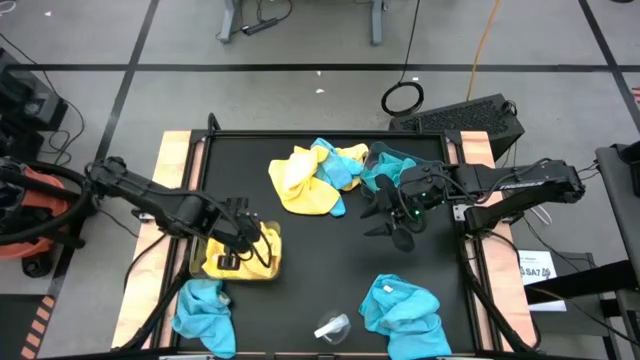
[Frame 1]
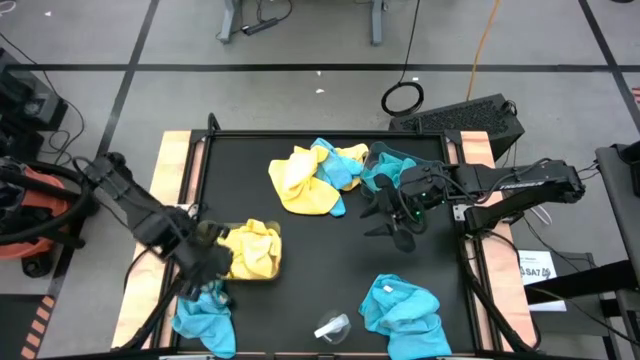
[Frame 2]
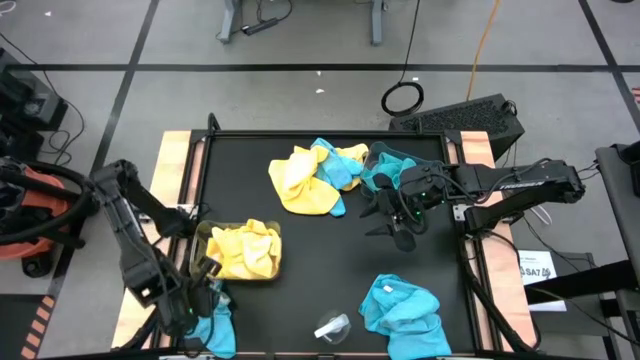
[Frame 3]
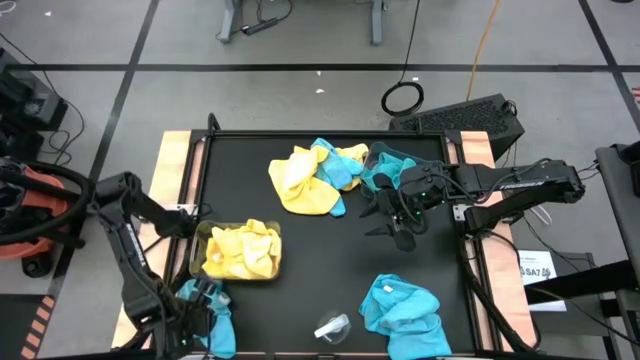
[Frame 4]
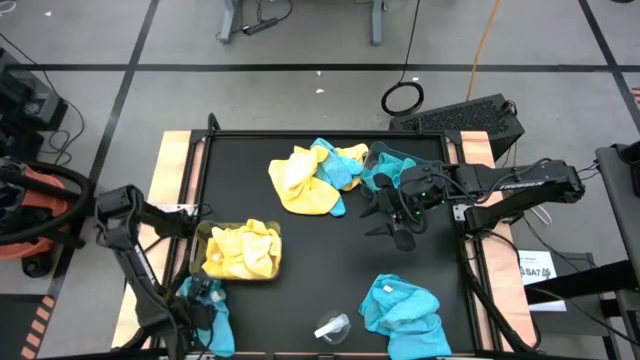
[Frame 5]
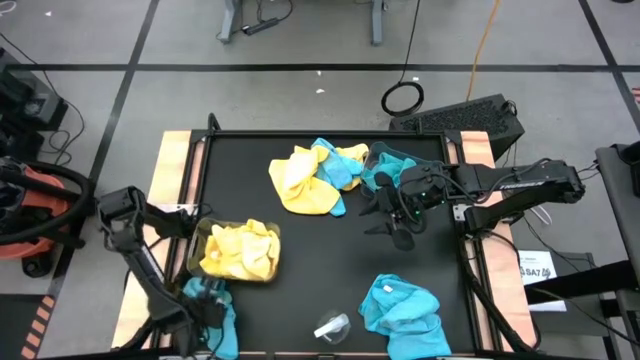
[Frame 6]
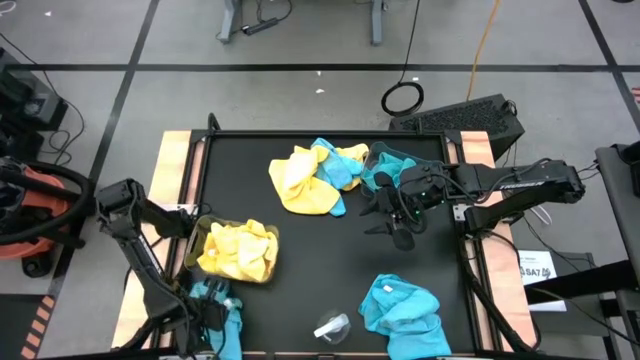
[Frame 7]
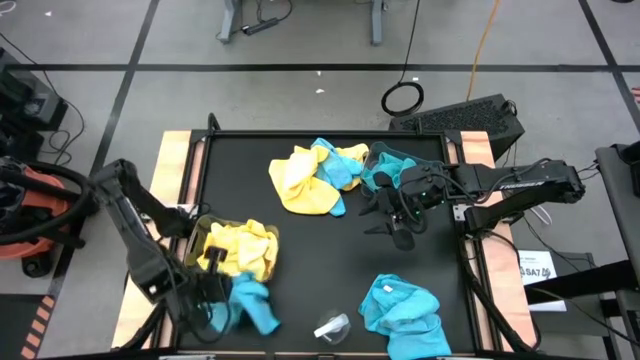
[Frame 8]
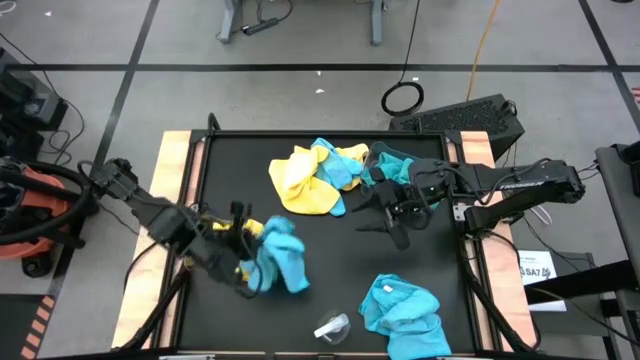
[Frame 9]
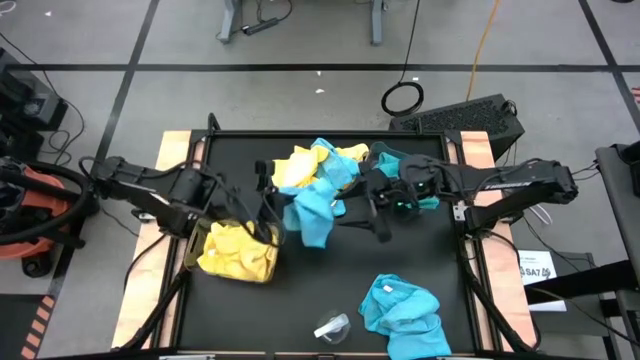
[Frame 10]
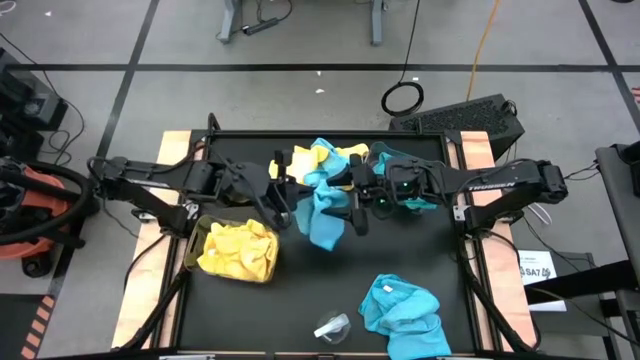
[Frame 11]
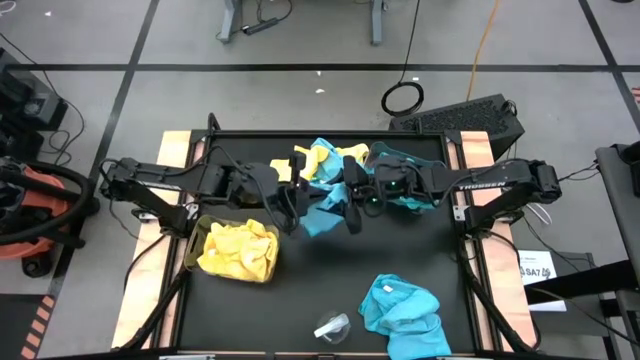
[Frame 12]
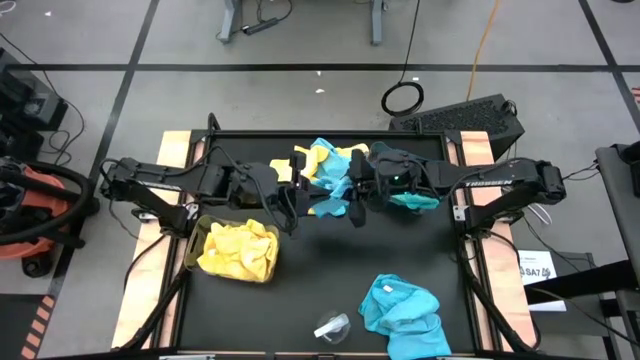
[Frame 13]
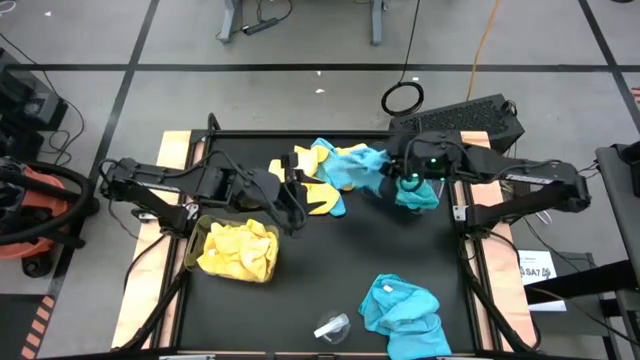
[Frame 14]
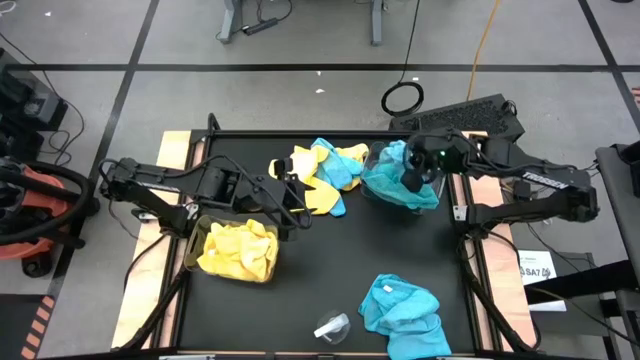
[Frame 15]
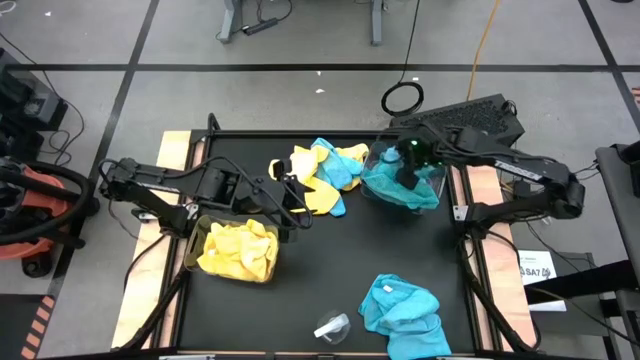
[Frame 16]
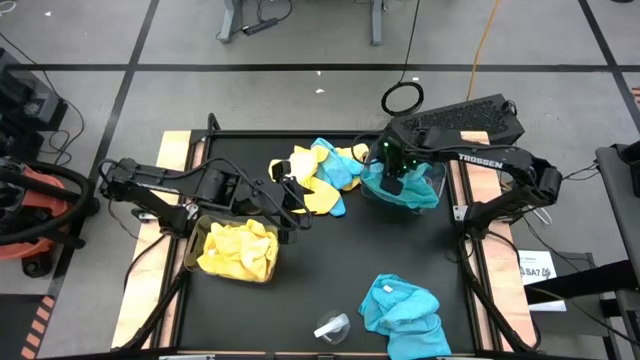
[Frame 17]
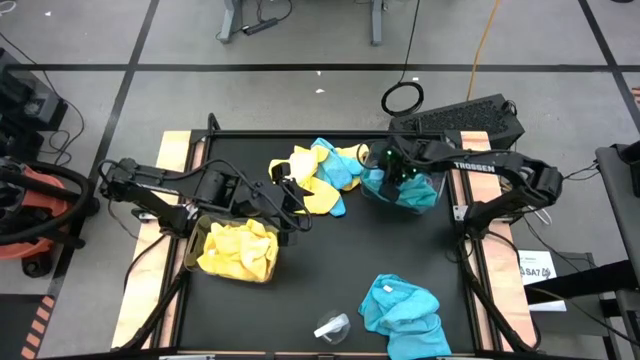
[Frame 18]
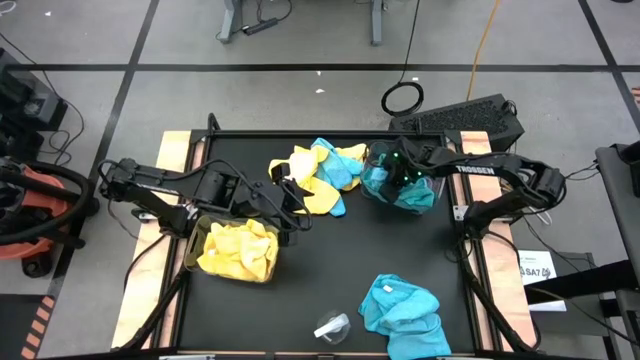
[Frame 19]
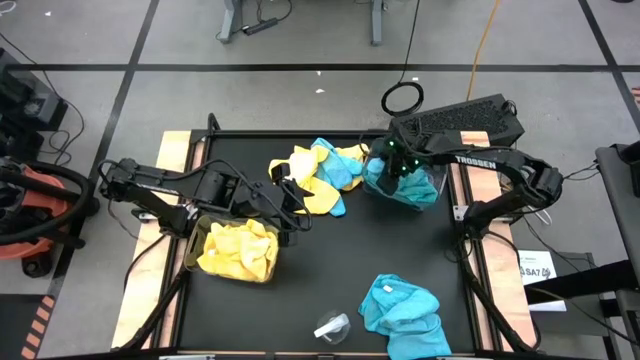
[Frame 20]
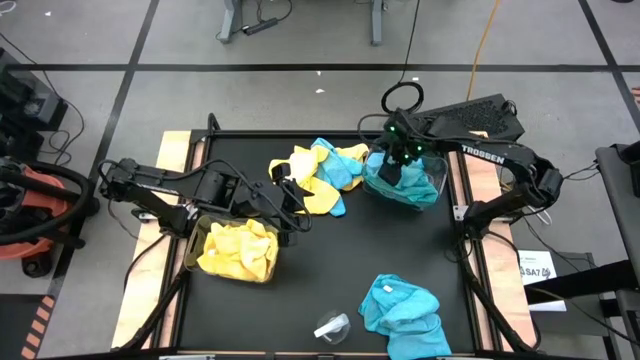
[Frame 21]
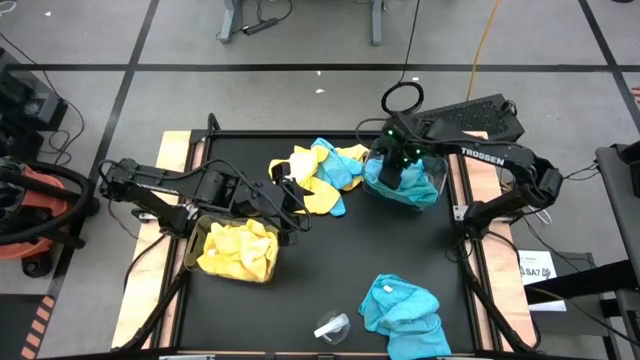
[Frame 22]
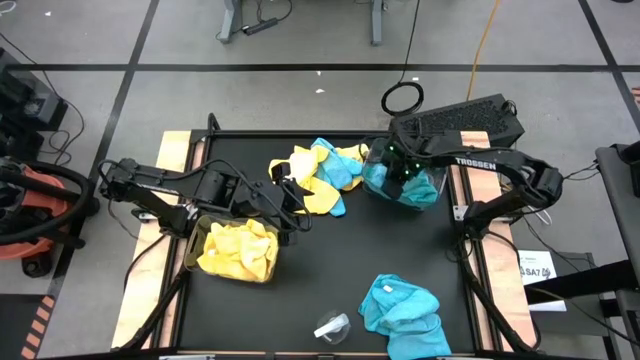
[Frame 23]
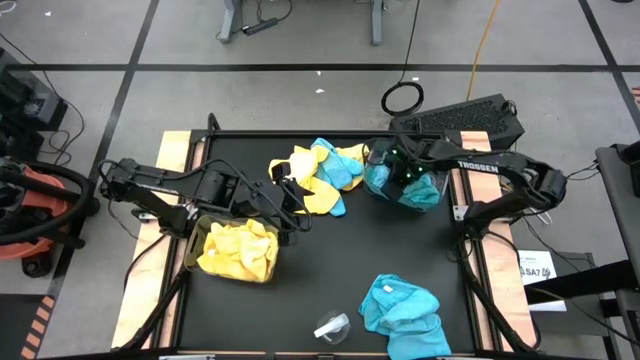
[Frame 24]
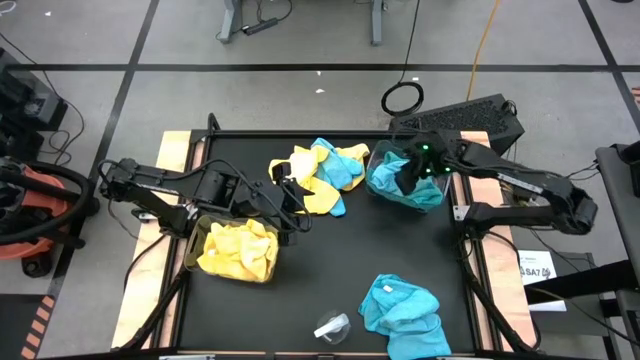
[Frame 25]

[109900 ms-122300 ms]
Task: Sort microfiber towel by color & place in baskets
Put the blue microfiber towel into the top transparent bin

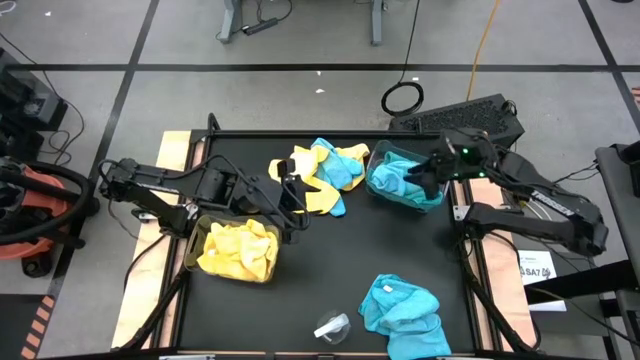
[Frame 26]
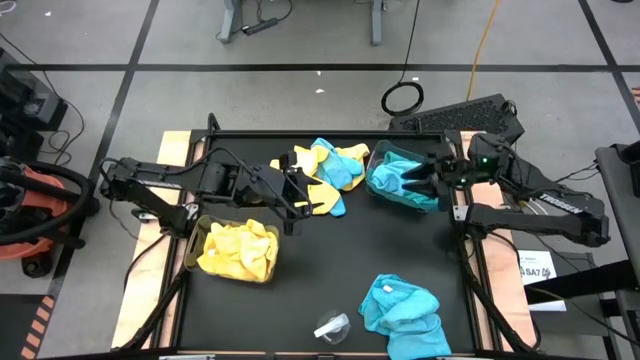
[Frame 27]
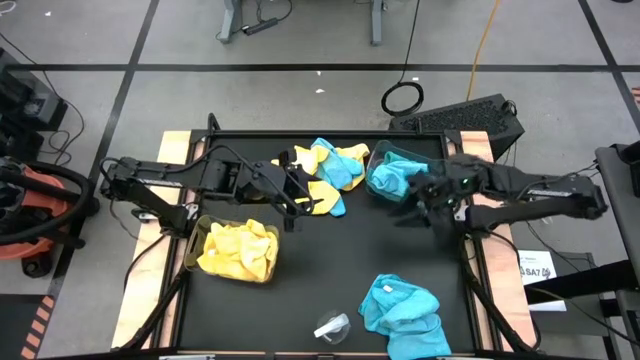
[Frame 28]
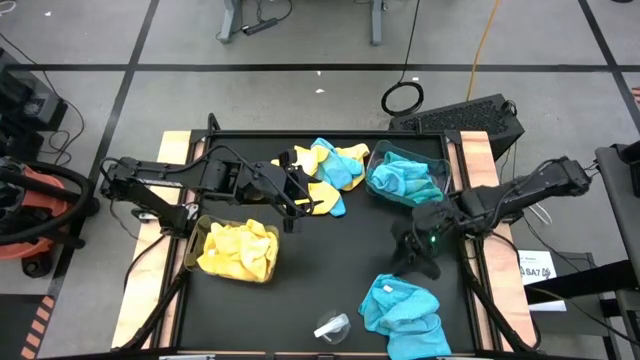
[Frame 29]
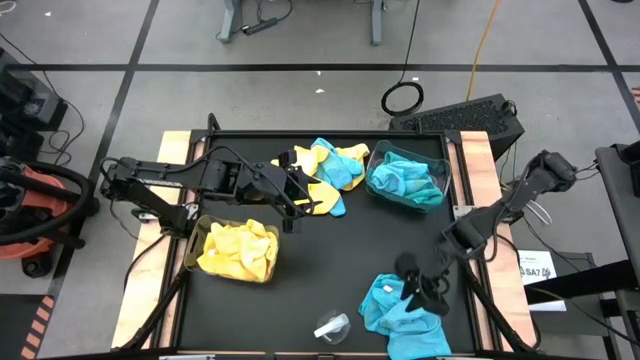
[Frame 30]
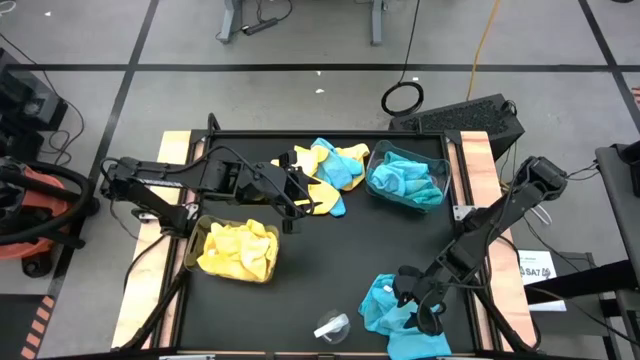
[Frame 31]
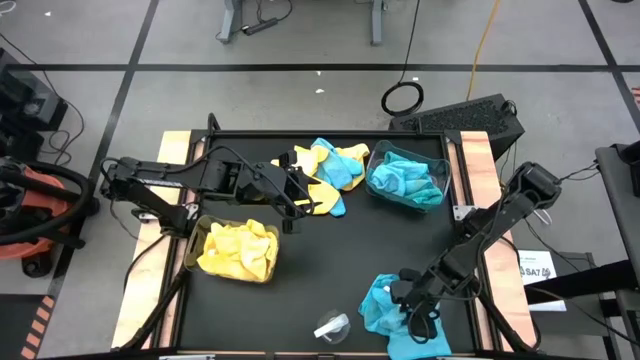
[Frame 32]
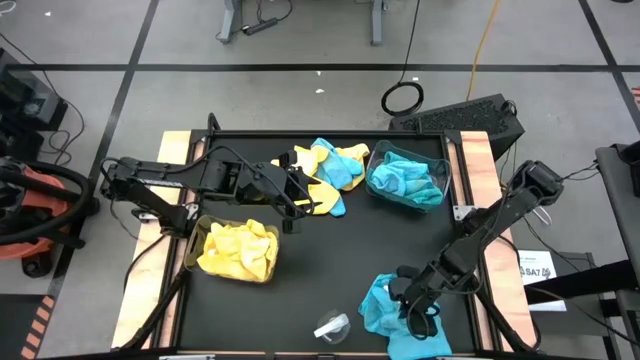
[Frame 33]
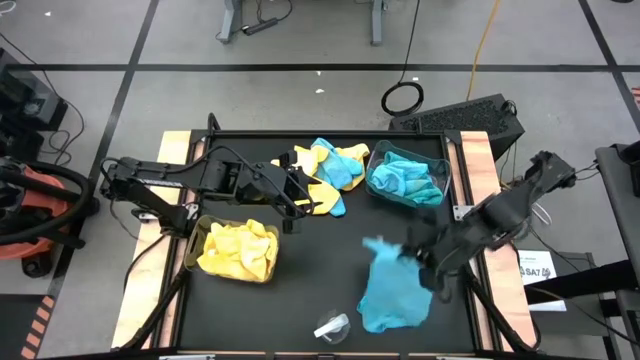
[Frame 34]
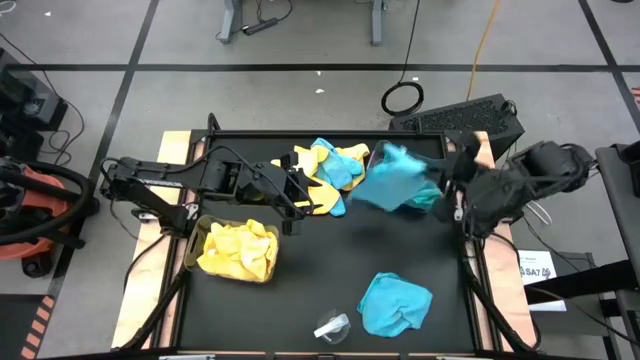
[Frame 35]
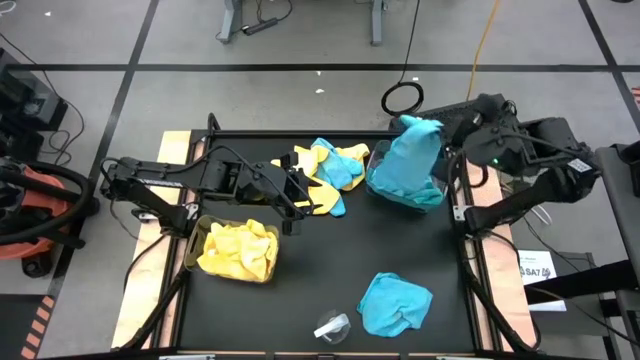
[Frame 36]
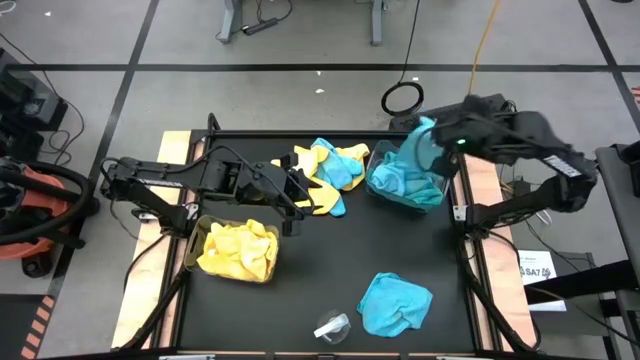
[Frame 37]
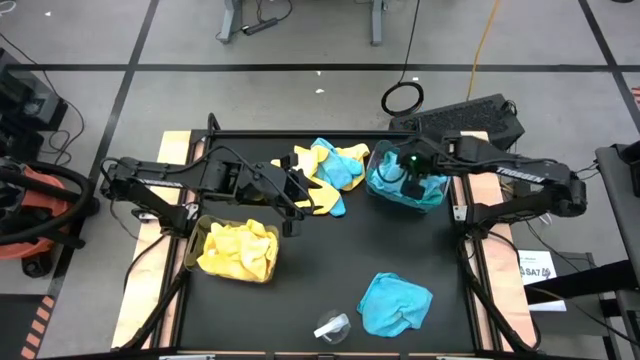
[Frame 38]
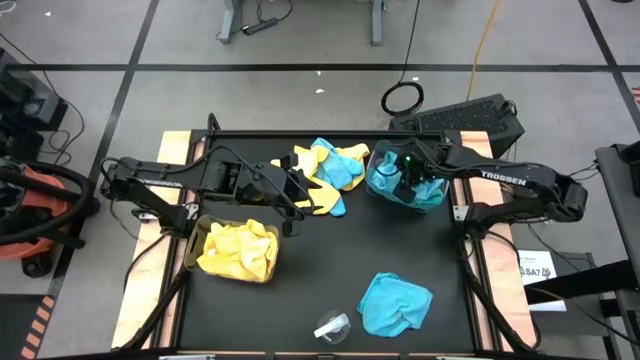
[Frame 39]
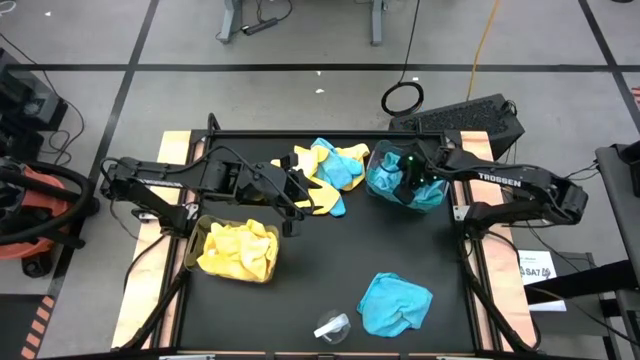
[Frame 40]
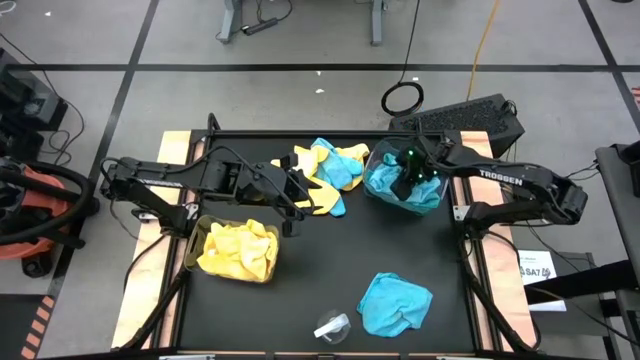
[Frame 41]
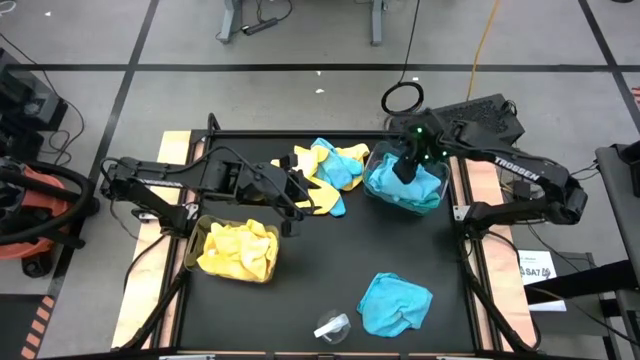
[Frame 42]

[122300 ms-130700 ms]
Put the blue microfiber towel into the top transparent bin
